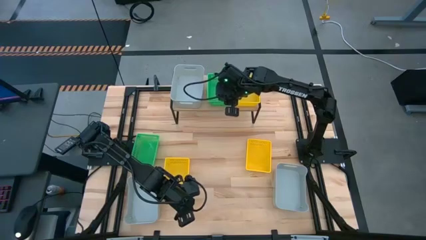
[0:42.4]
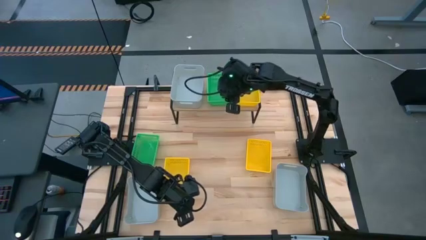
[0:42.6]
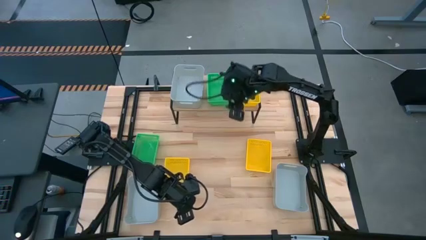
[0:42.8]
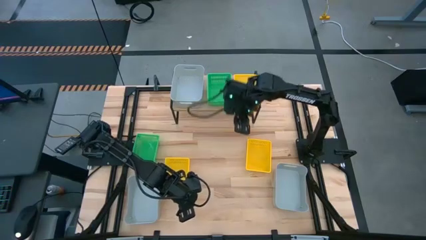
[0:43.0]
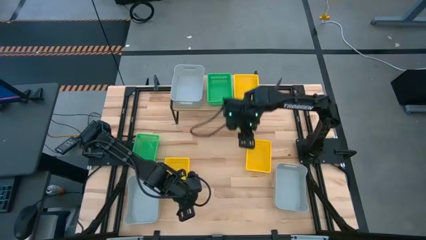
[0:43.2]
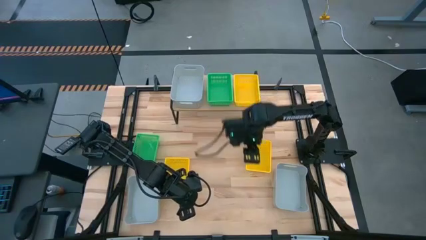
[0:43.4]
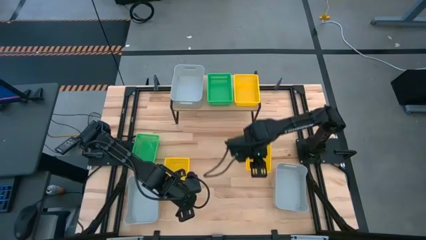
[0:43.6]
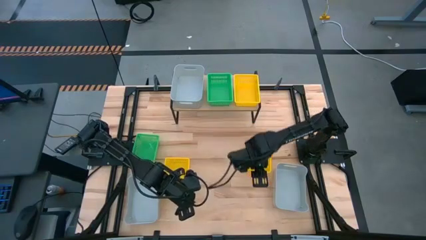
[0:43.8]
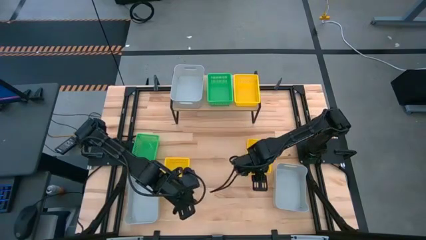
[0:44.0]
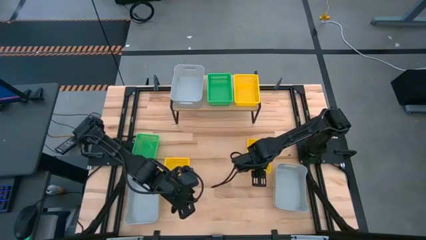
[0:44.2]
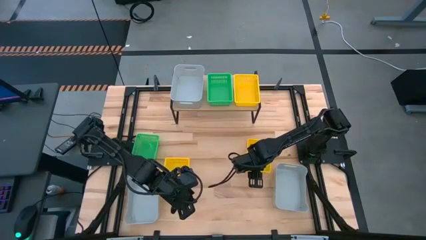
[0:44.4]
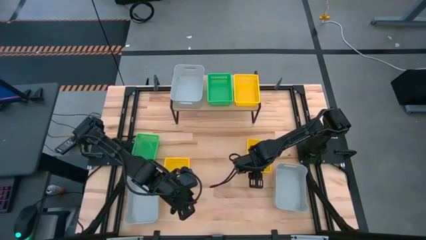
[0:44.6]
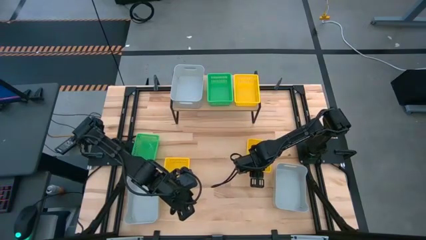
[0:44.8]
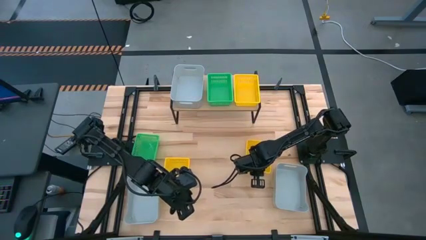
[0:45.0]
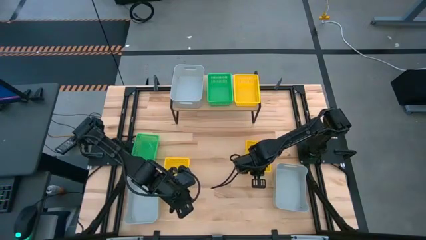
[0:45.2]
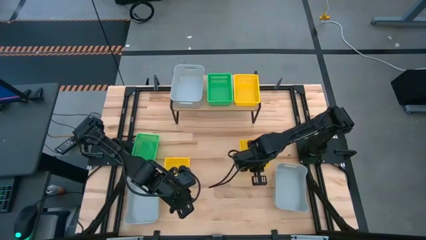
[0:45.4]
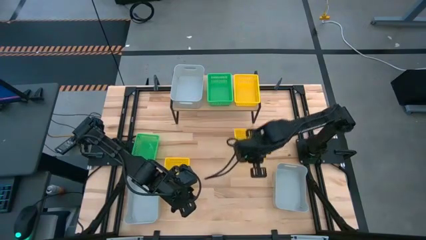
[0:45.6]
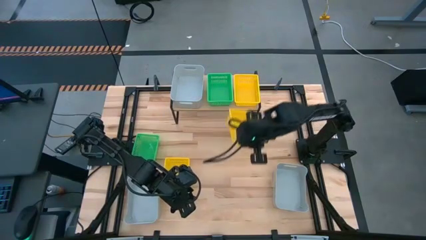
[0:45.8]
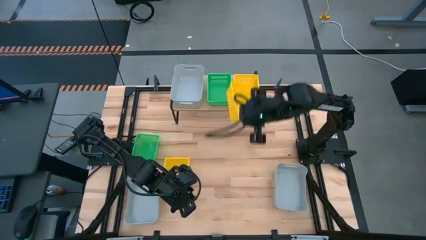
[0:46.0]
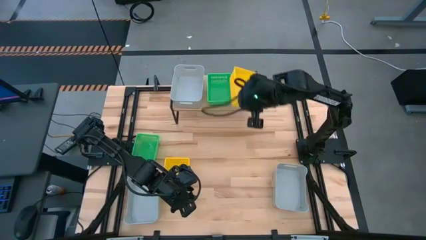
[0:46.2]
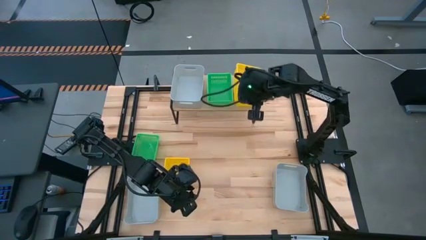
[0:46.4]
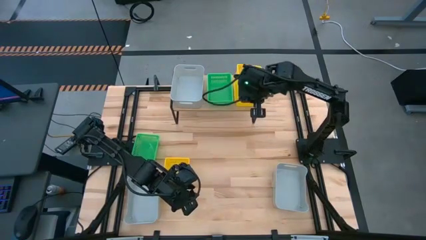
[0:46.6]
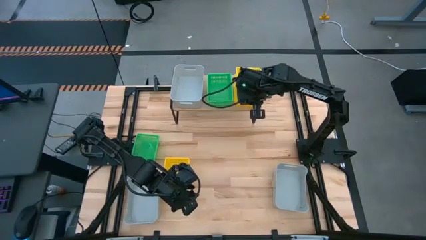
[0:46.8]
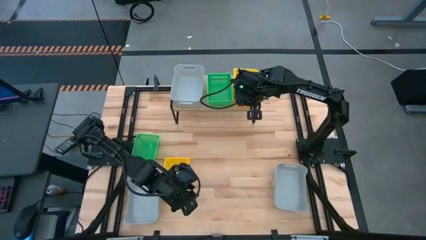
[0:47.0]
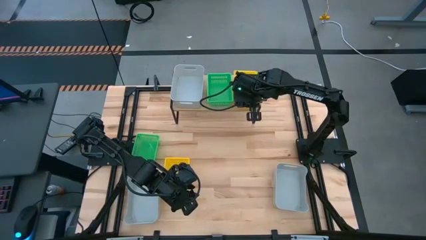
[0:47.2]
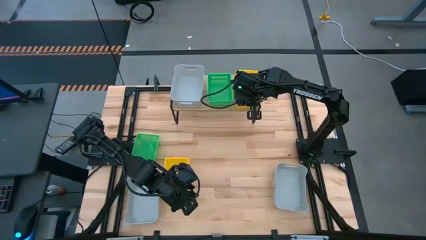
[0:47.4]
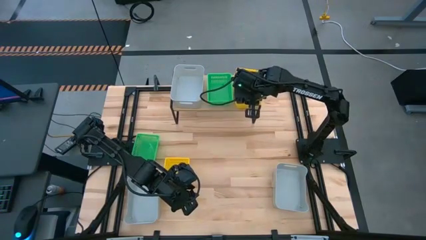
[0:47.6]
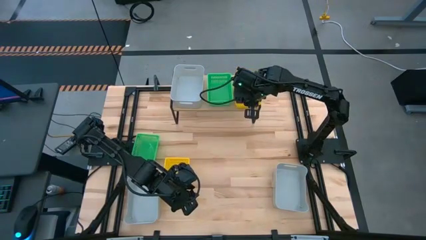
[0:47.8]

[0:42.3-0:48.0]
Task: Stack baskets on shelf by color
Stack the right yellow bin on top of the yellow bin on the shelf

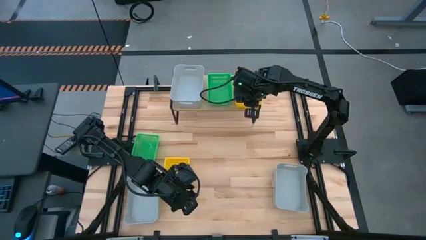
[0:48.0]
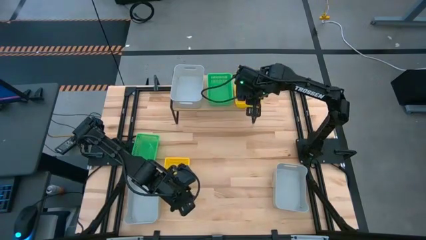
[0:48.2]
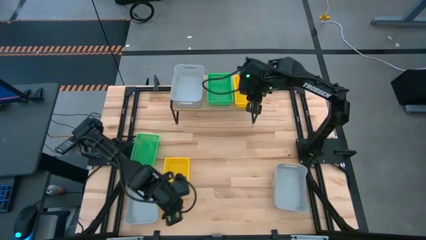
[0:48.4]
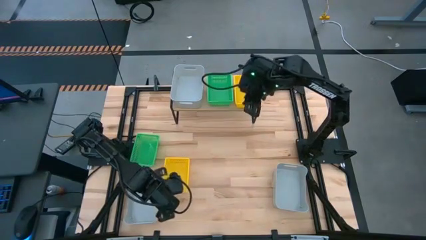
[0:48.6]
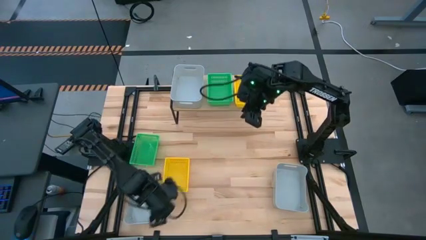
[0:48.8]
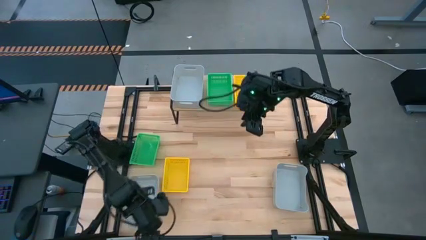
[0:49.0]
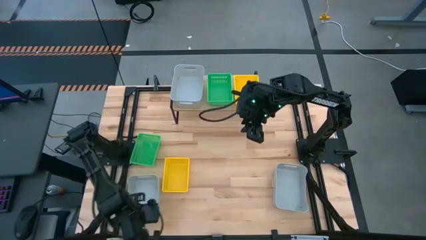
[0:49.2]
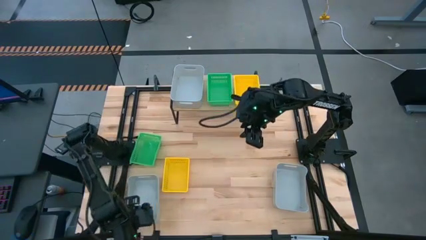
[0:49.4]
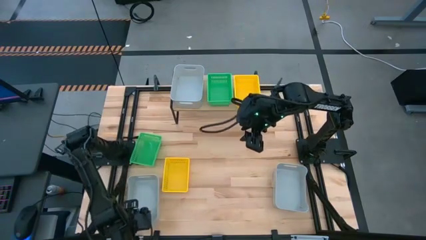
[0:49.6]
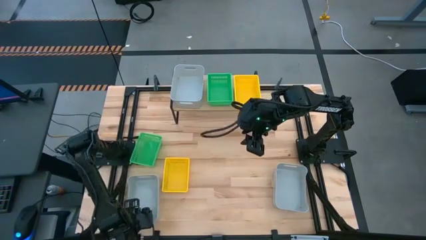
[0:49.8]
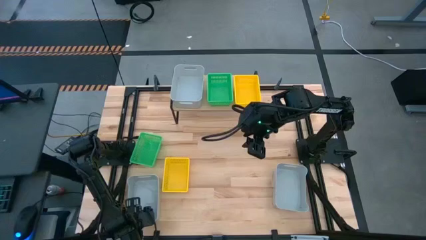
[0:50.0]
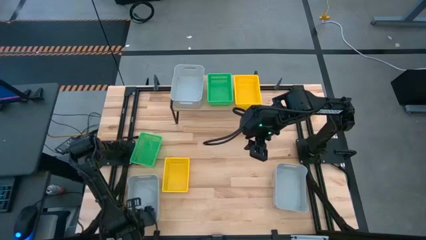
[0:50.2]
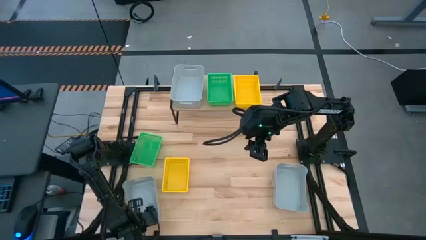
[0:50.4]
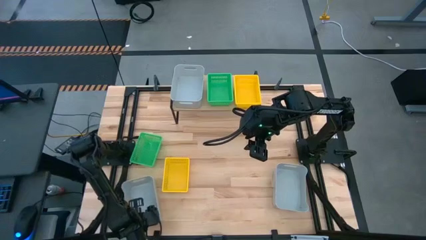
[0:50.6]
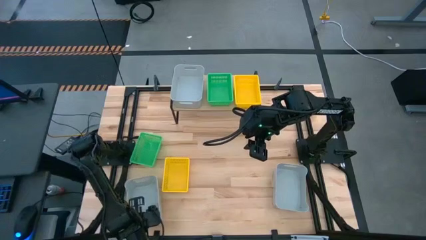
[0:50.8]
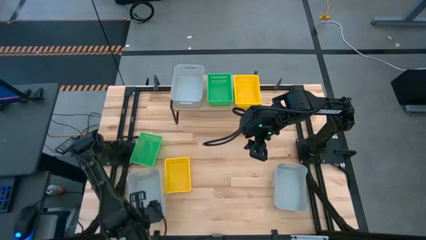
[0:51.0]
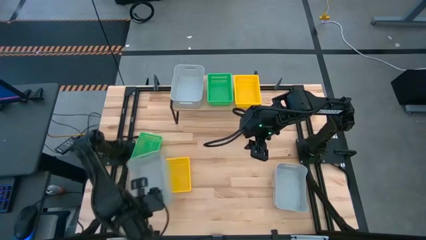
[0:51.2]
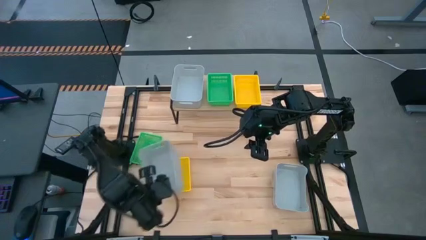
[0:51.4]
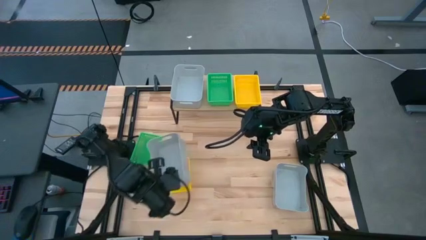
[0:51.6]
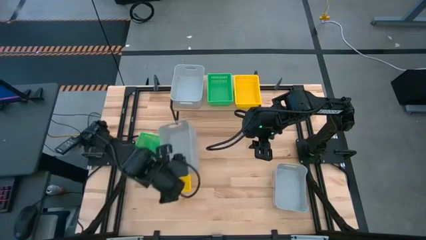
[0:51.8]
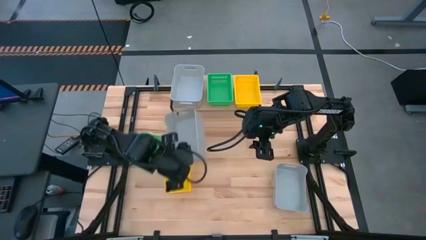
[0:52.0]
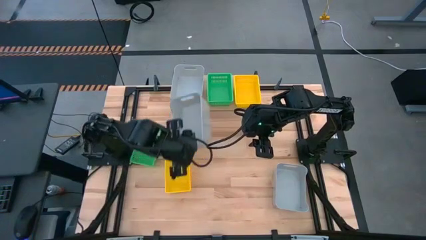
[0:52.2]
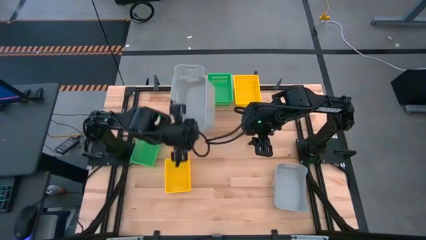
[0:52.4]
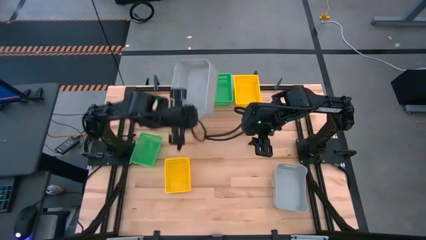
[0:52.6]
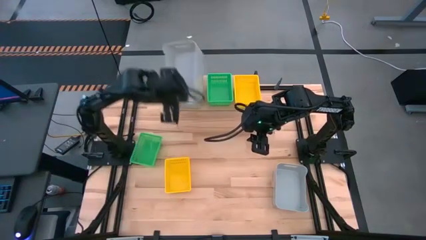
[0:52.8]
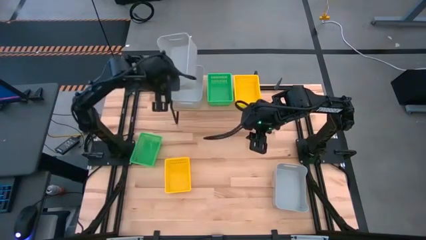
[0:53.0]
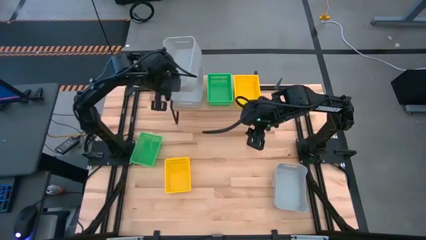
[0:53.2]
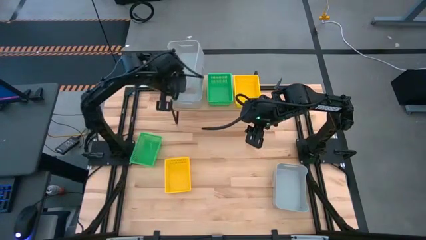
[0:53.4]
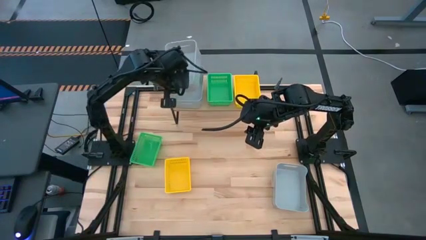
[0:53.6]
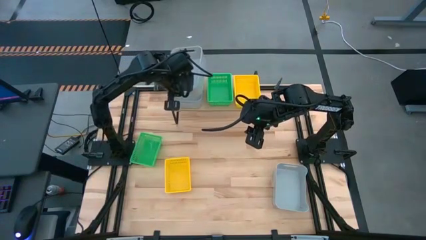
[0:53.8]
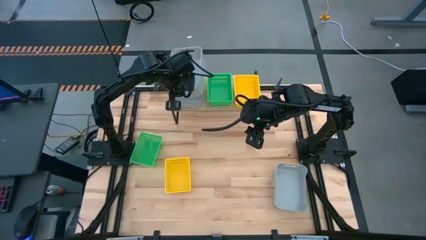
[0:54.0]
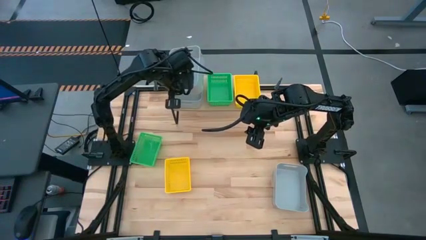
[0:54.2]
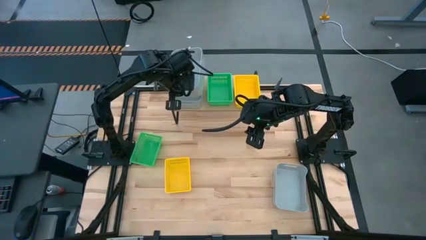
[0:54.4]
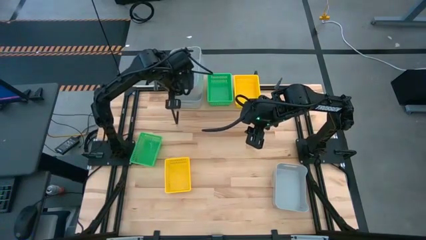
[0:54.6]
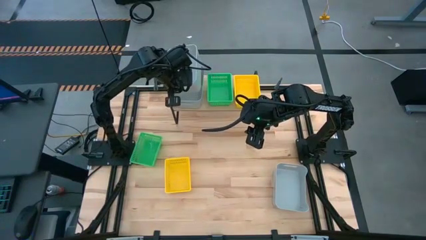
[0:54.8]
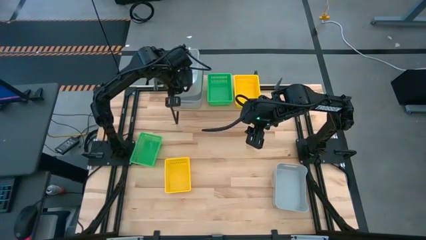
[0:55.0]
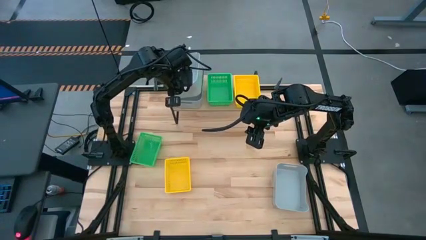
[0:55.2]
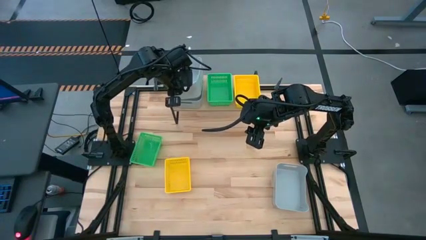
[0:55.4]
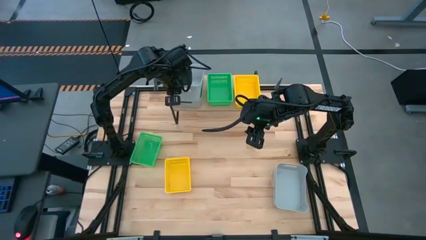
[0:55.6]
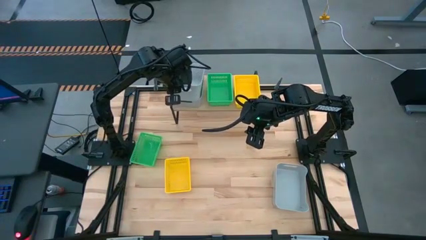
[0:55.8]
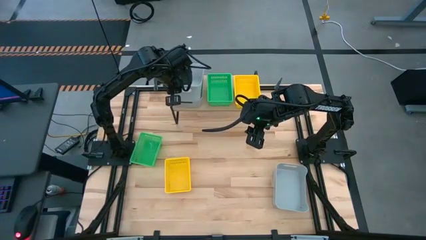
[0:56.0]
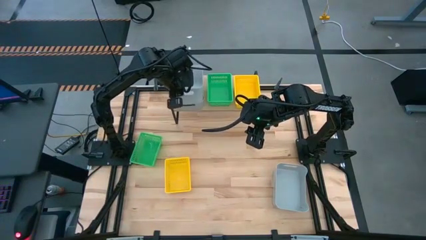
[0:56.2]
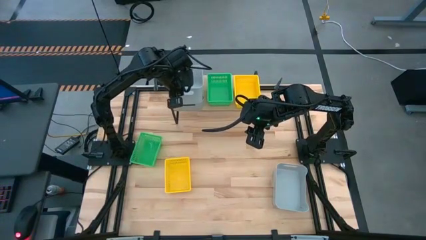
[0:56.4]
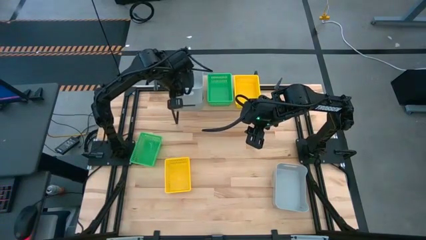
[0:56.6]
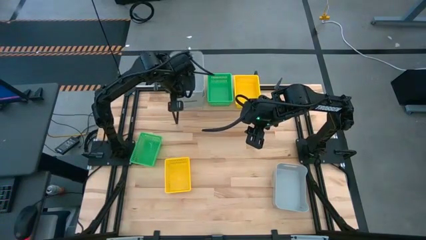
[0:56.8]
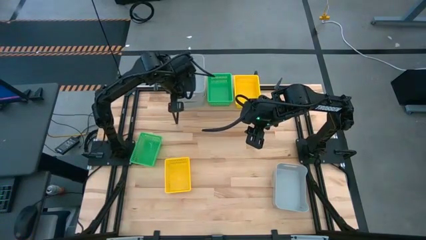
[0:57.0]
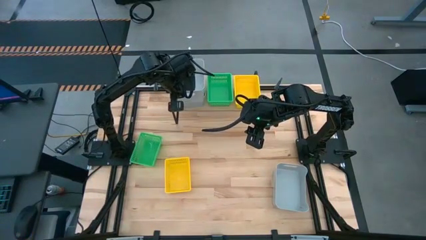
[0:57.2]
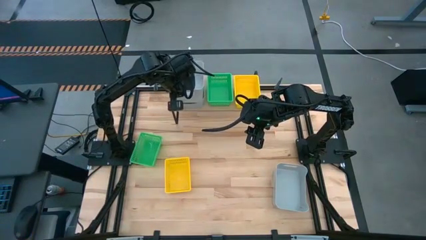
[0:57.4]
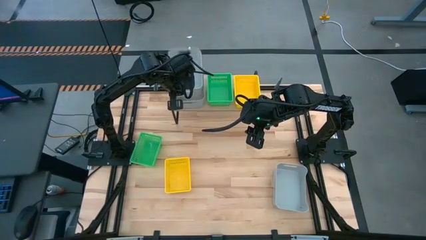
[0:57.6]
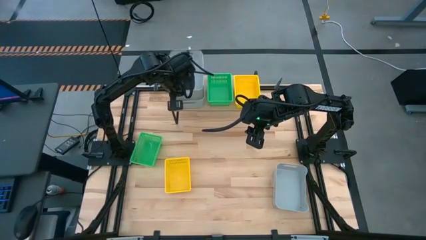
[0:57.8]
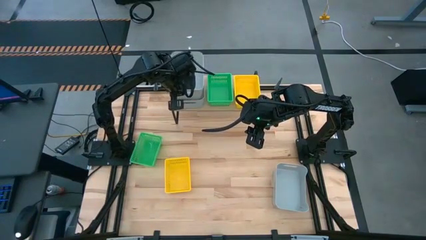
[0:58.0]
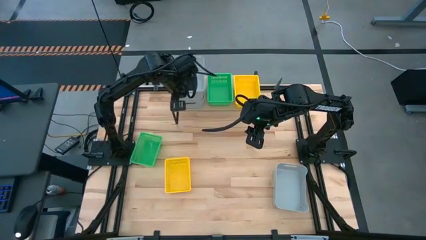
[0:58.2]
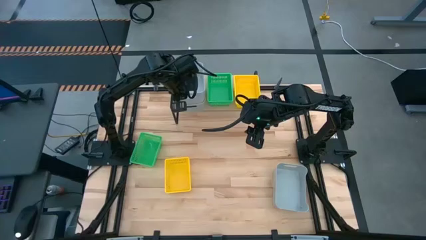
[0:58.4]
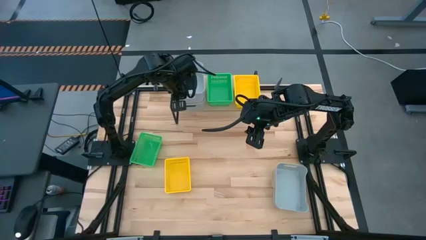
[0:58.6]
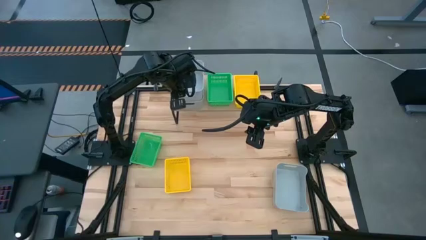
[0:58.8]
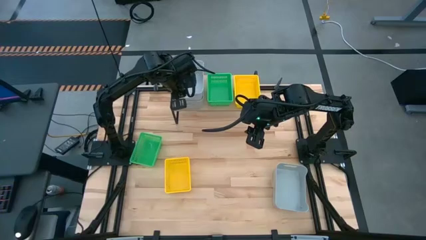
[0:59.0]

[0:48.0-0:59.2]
Stack the left gray bin on top of the gray bin on the shelf
